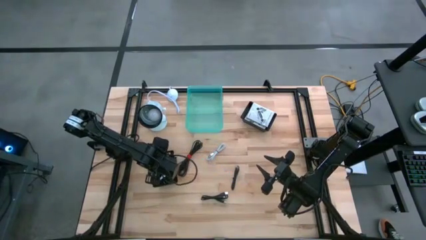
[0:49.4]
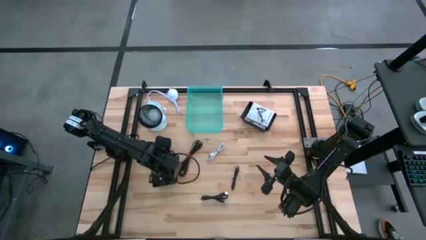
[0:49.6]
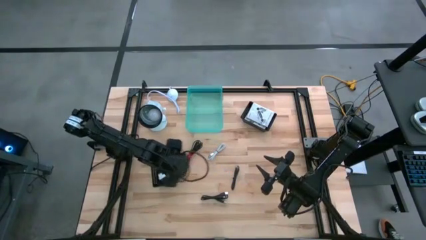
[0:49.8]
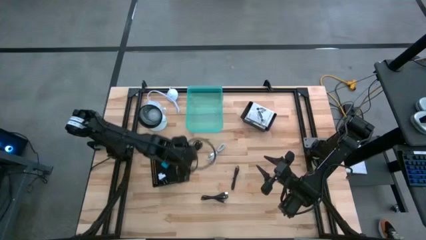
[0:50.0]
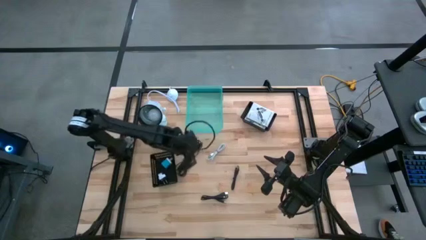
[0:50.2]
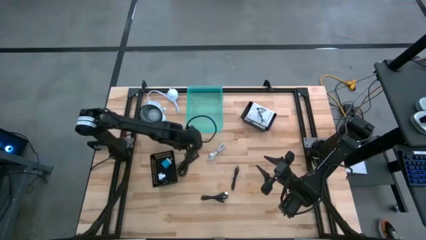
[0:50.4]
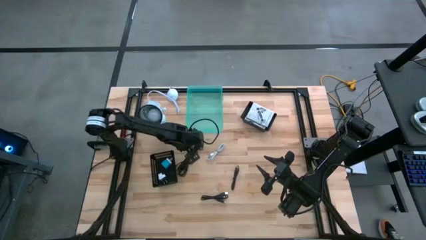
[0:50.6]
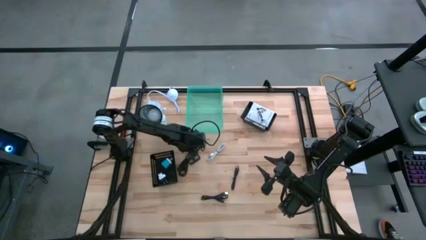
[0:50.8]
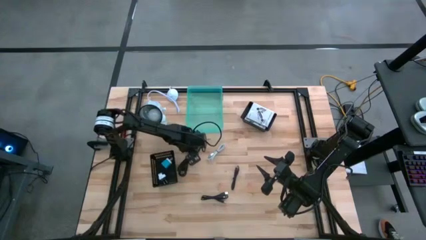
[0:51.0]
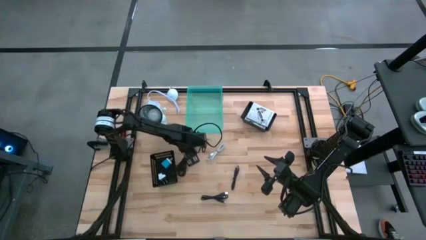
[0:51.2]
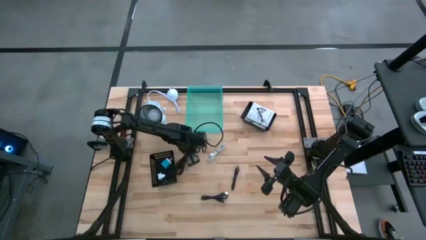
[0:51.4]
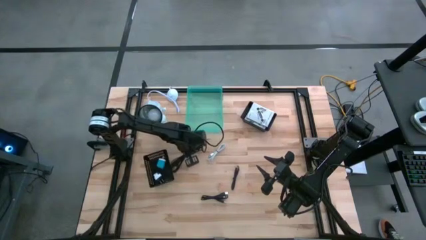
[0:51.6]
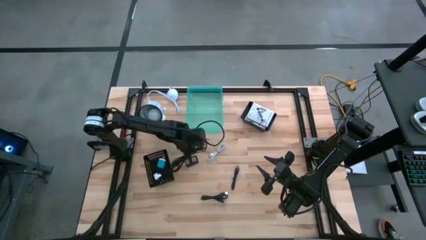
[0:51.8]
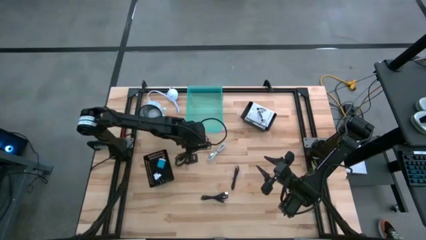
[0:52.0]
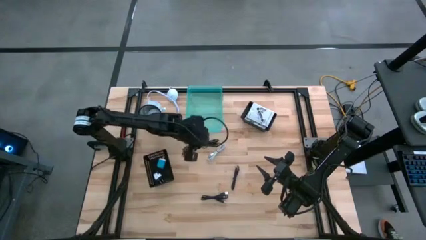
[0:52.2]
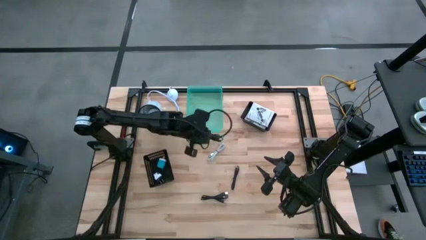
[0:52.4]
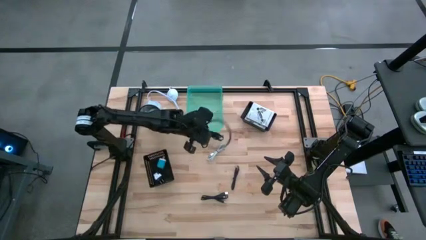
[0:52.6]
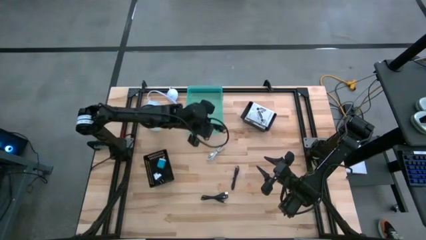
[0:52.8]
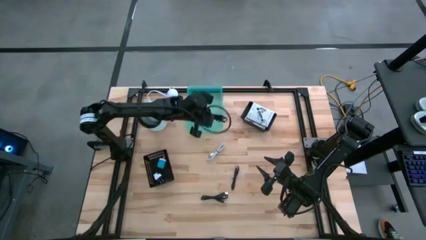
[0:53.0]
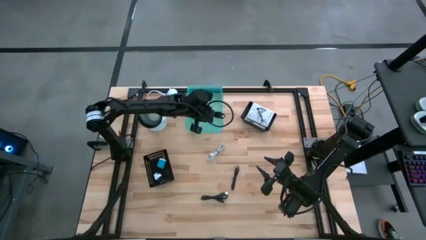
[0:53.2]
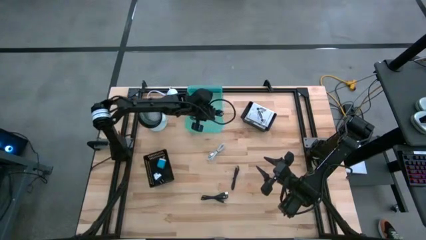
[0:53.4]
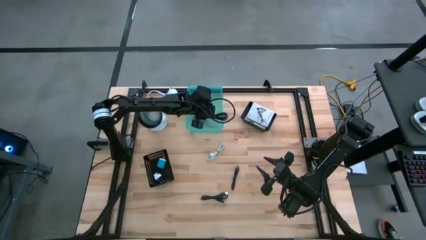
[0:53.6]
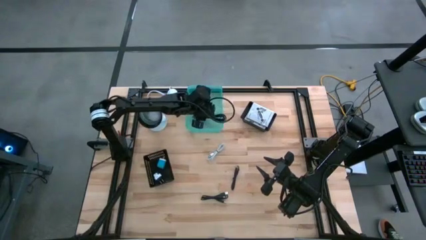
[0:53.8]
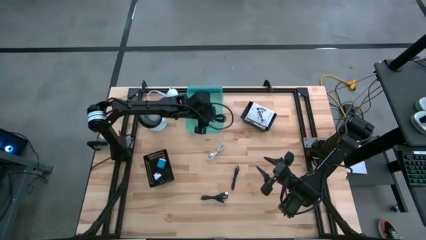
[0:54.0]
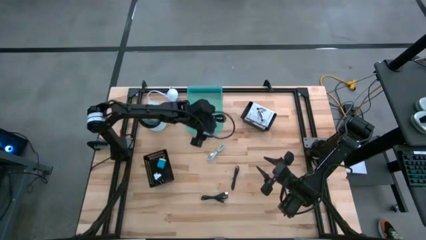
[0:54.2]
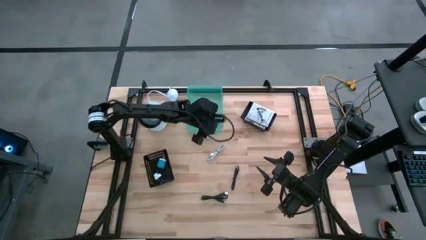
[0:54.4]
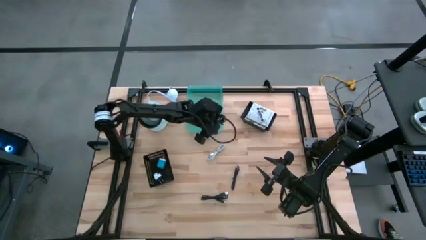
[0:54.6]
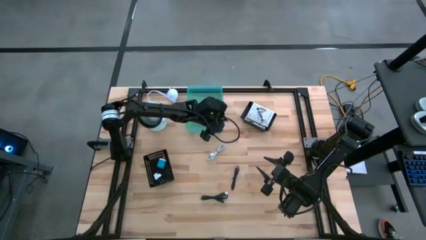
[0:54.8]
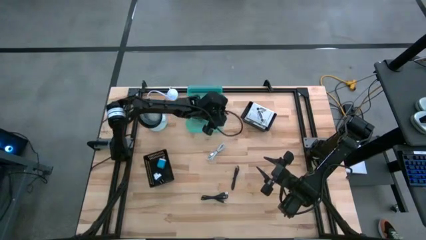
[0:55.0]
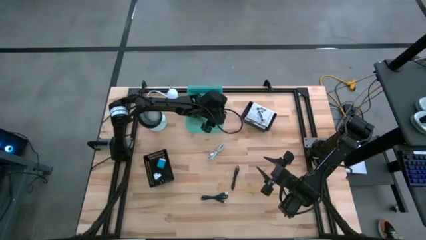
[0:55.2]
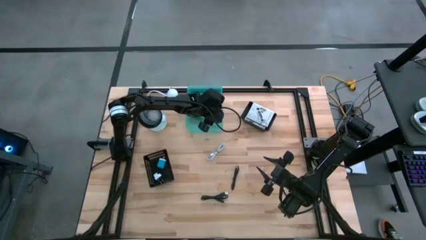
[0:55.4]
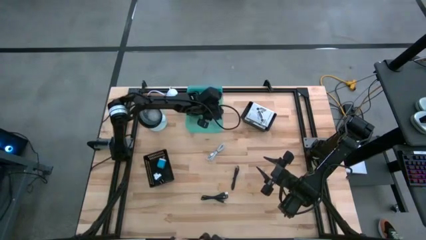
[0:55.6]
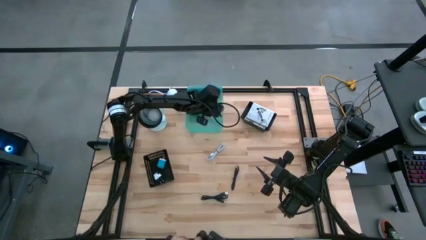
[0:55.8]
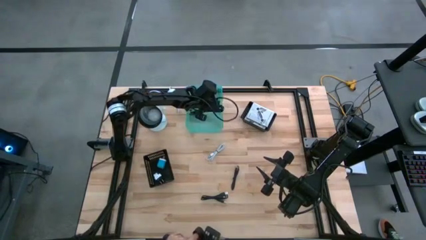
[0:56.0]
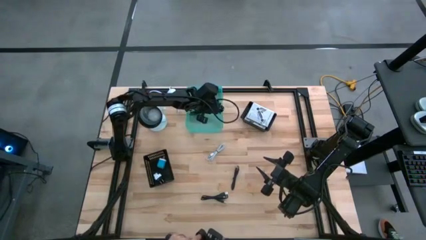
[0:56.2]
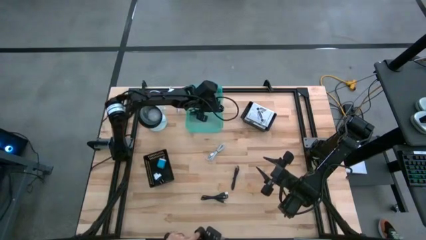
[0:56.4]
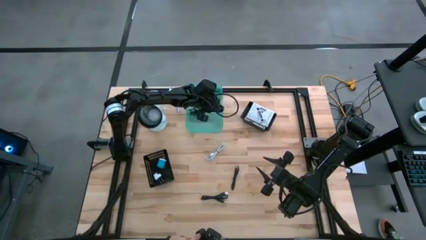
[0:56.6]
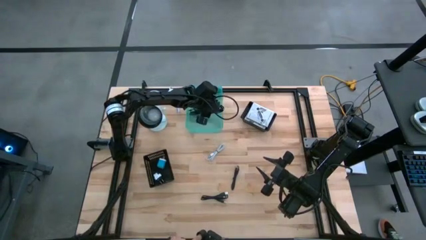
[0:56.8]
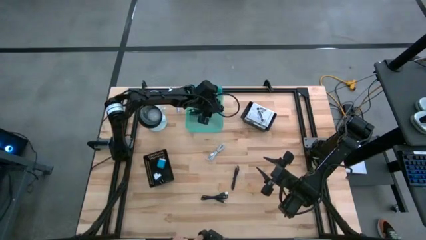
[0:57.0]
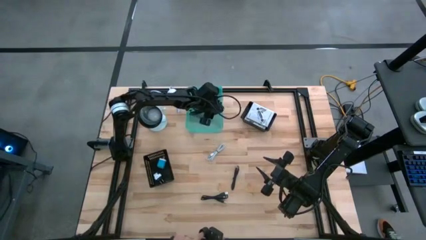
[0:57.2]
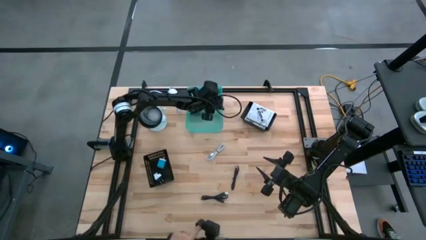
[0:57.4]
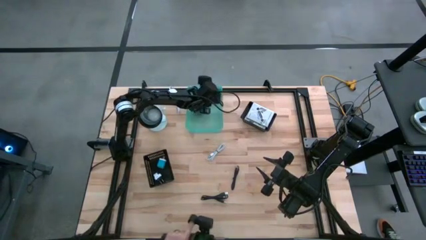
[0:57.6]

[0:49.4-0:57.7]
Task: Pick and place items into bin
Put the top left black charger cable into the green bin

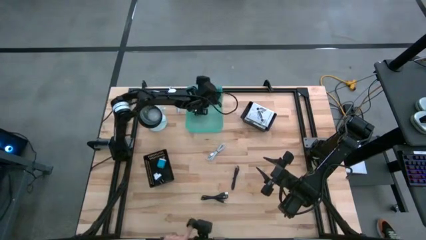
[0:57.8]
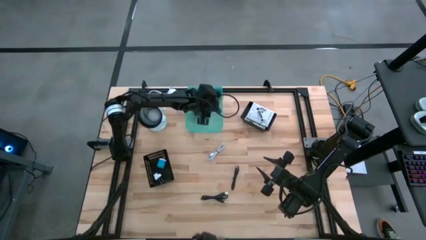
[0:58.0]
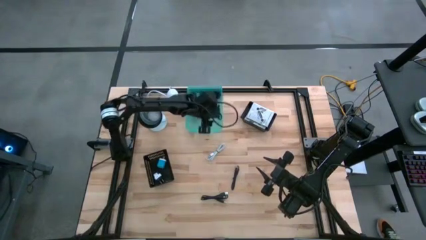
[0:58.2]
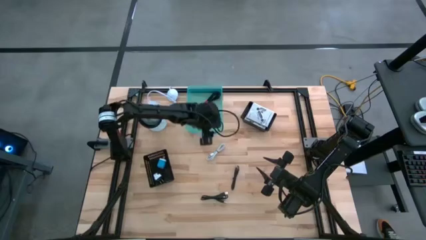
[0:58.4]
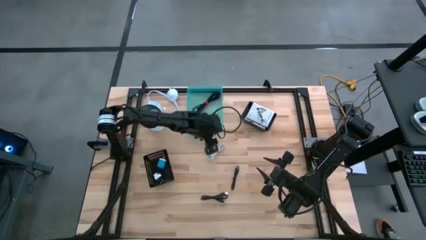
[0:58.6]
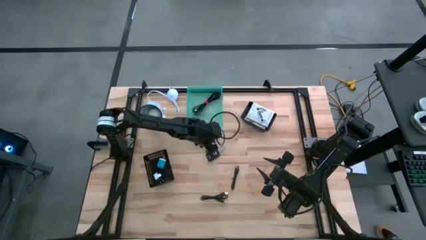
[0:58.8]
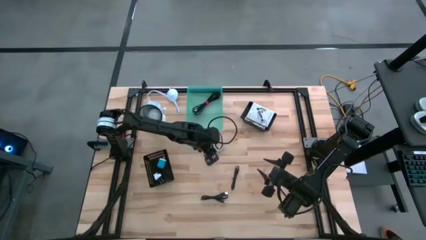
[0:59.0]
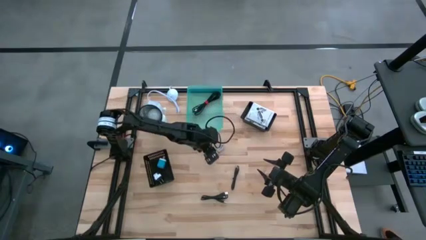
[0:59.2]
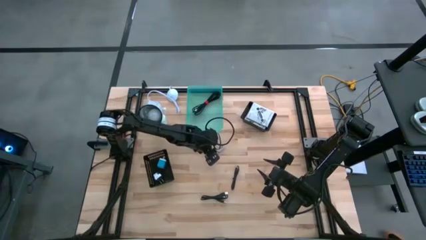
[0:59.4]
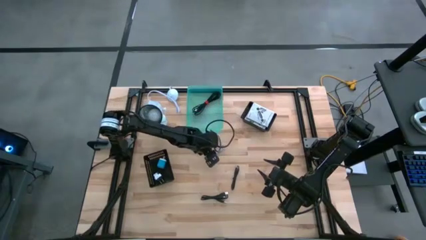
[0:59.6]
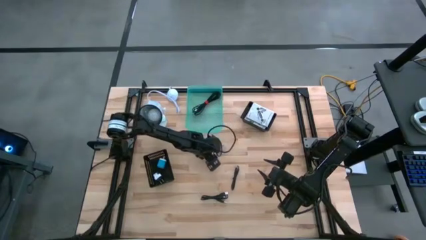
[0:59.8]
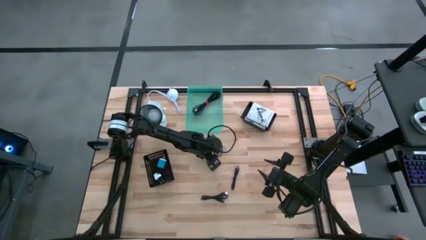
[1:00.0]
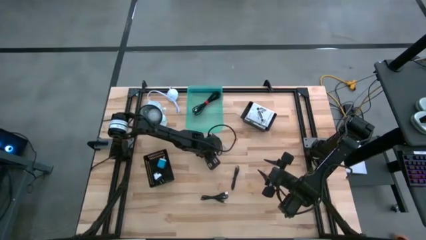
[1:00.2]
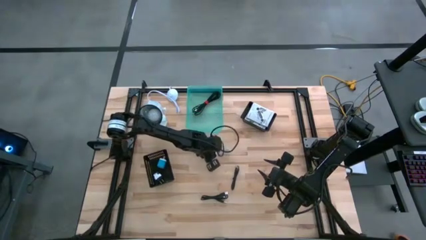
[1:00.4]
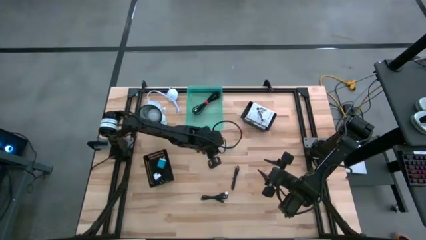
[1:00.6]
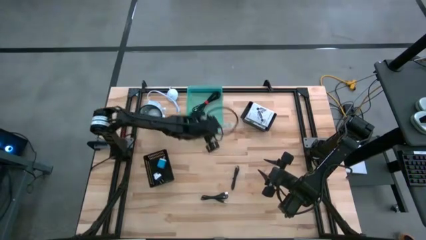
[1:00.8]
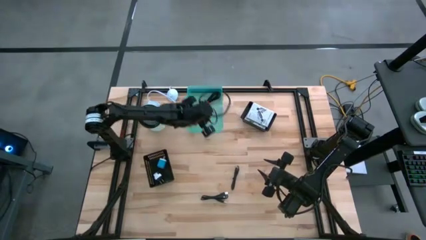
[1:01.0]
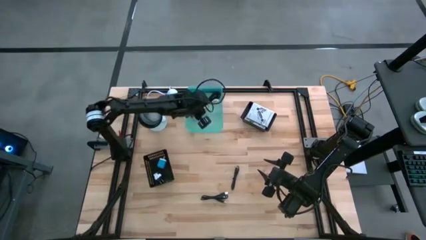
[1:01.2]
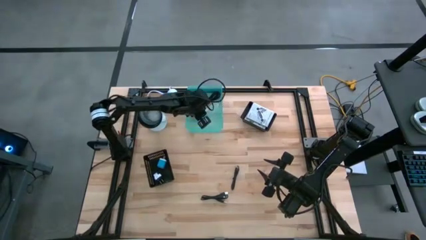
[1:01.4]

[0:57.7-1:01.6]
Put the white charger cable into the green bin

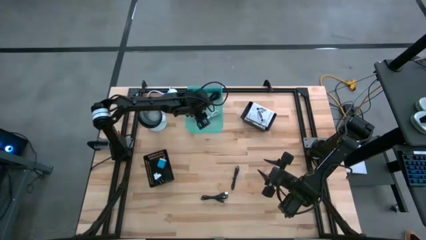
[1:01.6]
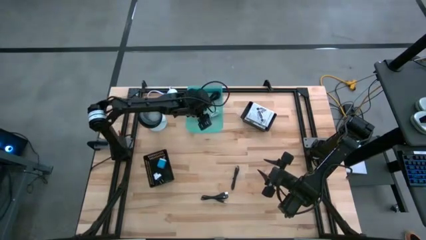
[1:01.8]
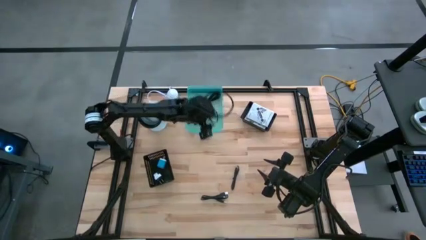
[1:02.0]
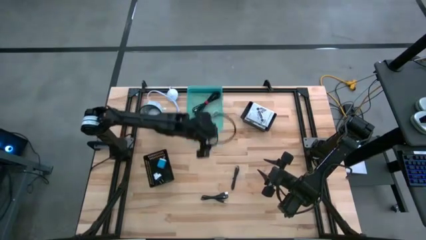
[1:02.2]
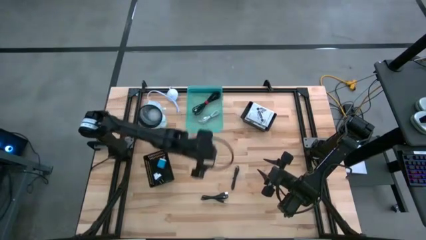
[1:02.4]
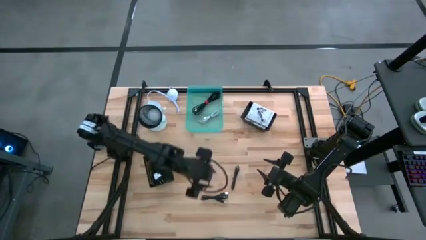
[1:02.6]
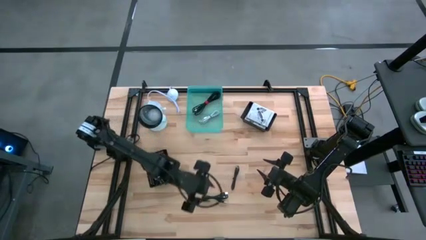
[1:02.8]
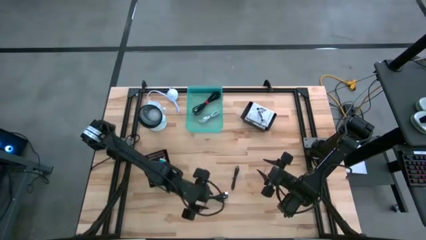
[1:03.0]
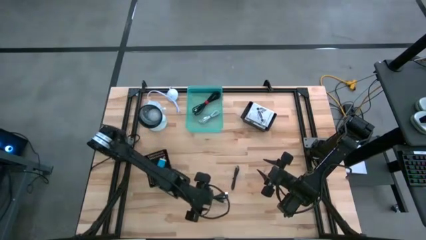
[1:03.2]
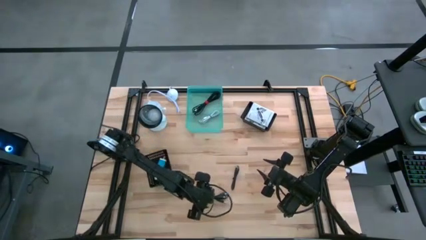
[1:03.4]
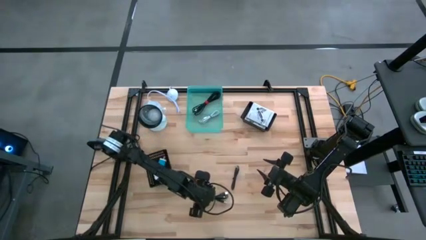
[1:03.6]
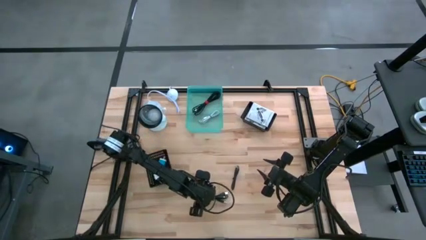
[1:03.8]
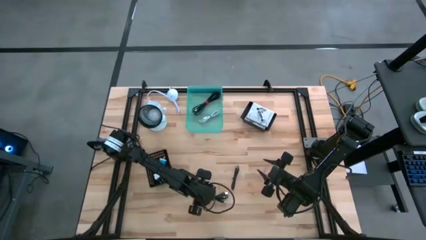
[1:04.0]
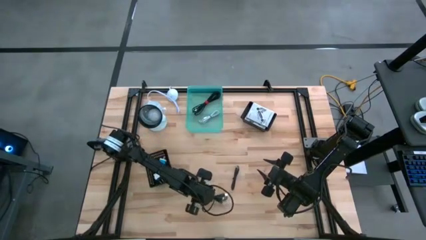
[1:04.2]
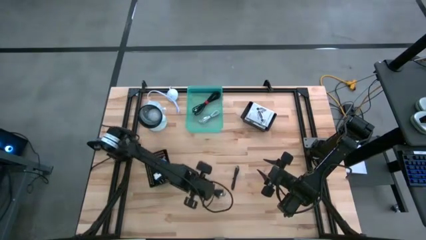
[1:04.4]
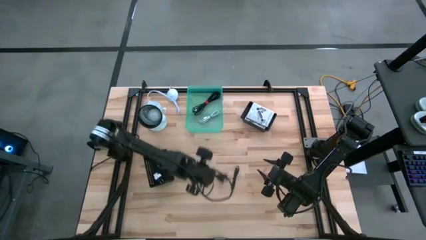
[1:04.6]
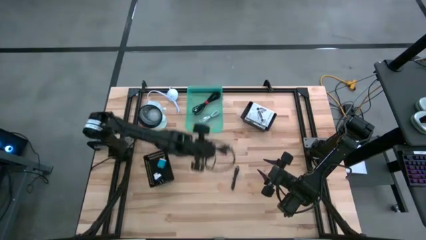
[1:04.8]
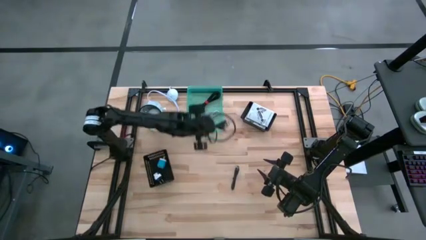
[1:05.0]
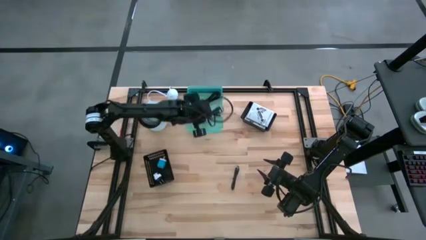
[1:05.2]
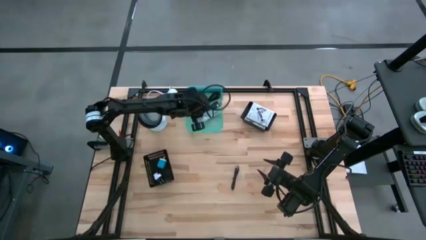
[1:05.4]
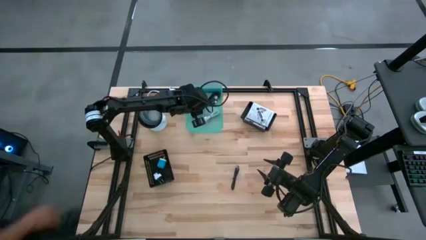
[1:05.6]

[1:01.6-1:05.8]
Put the left black charger cable into the green bin

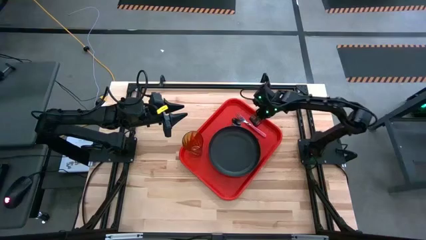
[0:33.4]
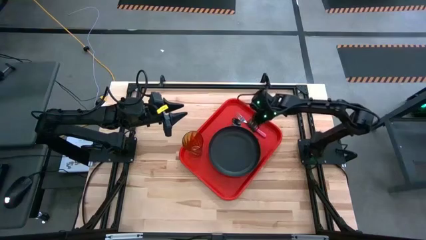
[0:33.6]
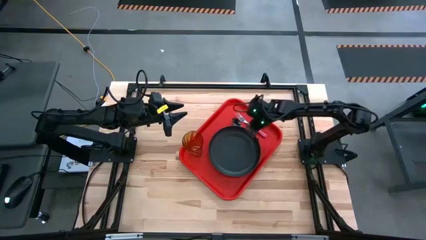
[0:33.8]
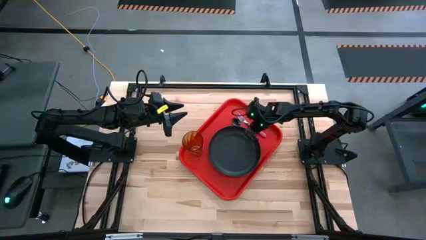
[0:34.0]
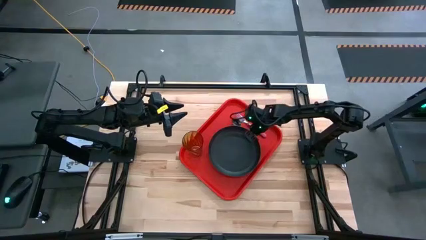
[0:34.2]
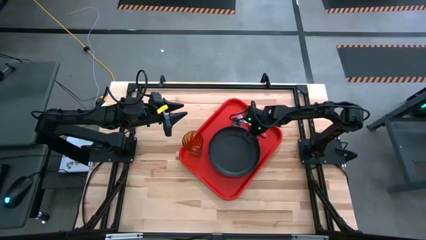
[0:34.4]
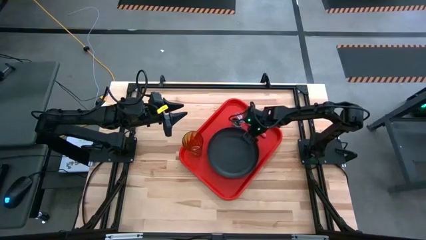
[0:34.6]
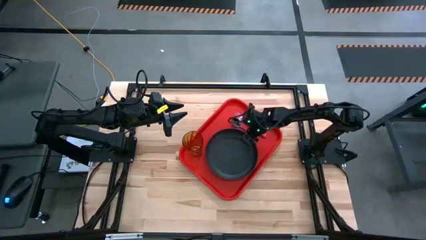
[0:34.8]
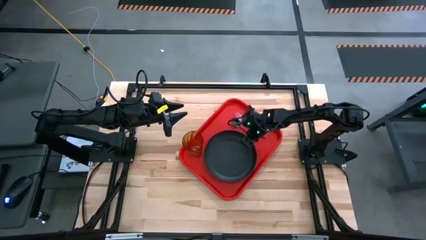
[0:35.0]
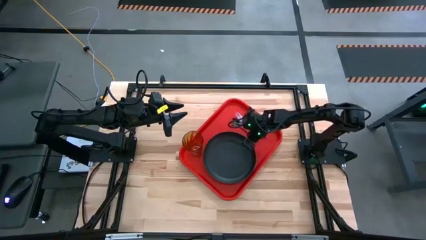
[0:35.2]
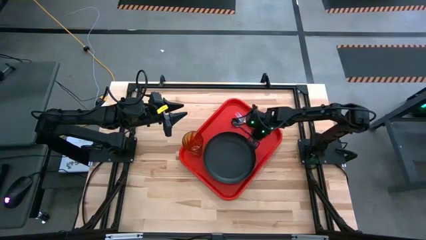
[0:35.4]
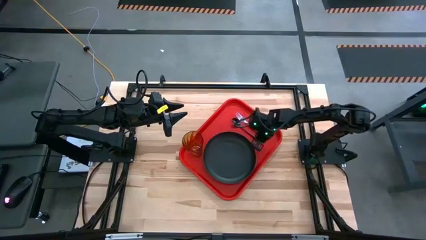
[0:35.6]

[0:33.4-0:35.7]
Task: Pick and place plate/cup/fork/spoon on tray
Adjust the black plate on the serving tray
